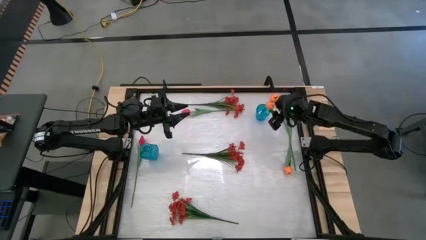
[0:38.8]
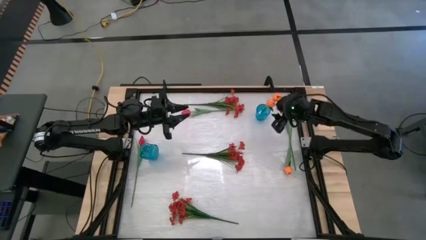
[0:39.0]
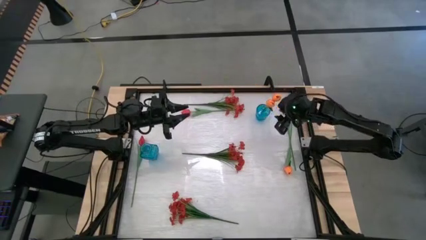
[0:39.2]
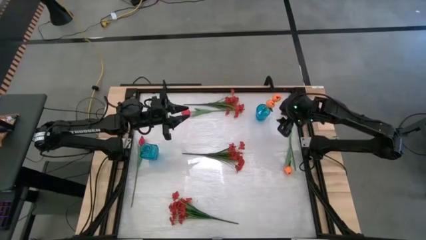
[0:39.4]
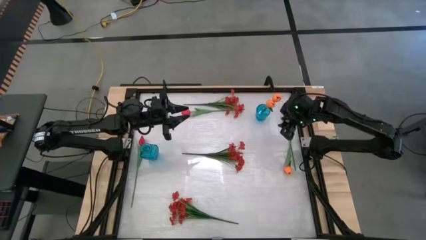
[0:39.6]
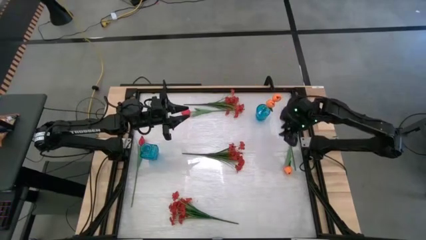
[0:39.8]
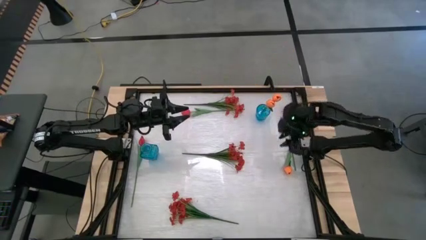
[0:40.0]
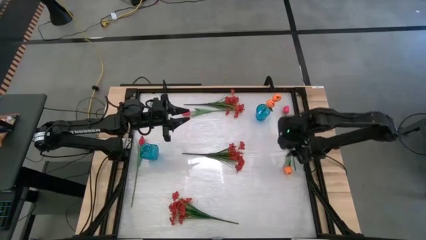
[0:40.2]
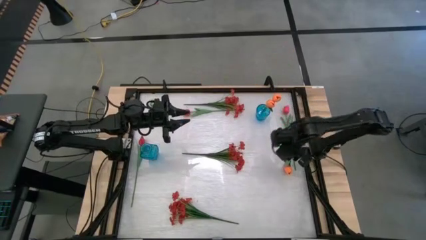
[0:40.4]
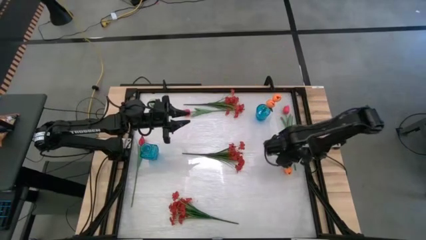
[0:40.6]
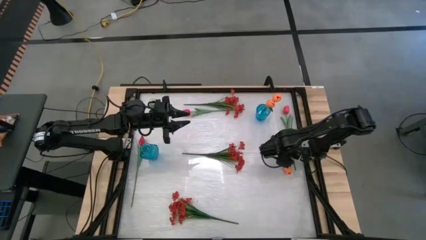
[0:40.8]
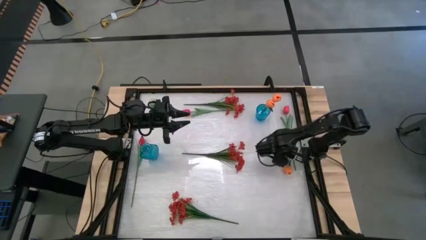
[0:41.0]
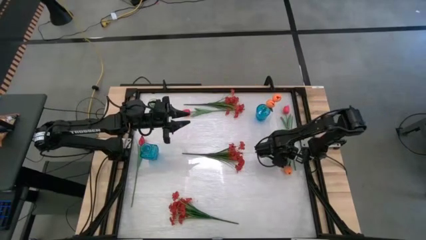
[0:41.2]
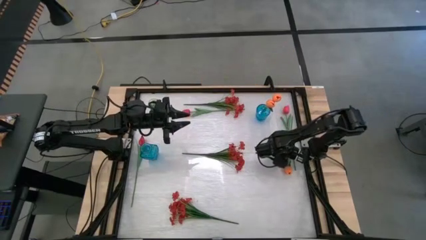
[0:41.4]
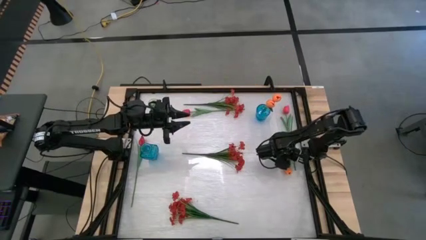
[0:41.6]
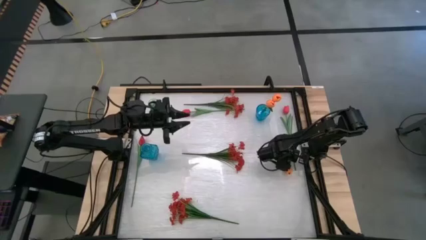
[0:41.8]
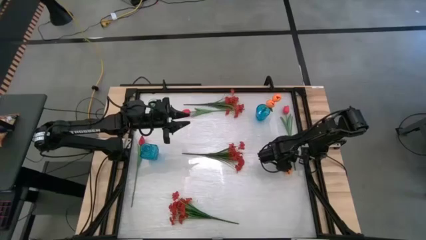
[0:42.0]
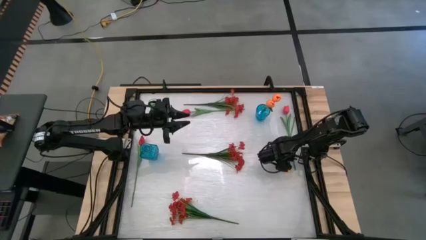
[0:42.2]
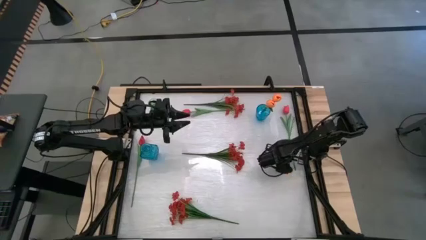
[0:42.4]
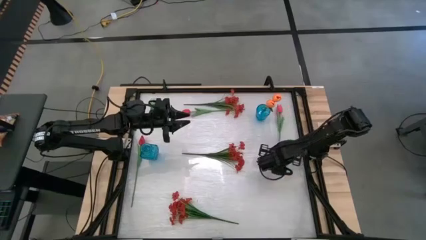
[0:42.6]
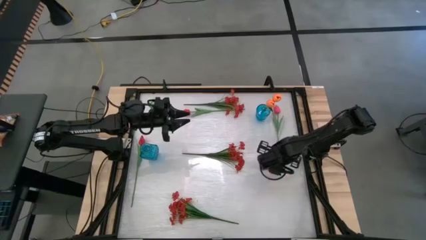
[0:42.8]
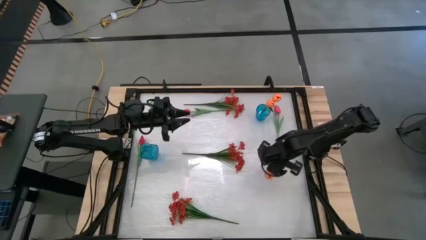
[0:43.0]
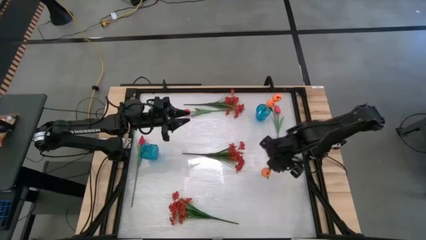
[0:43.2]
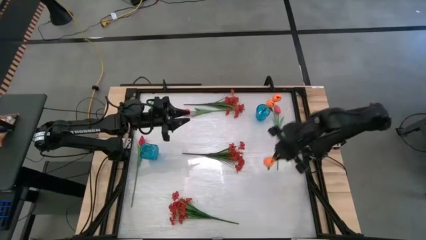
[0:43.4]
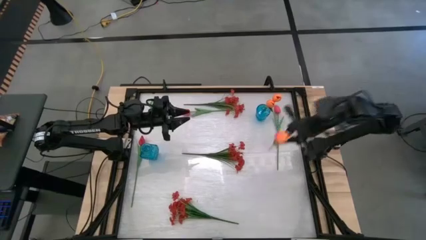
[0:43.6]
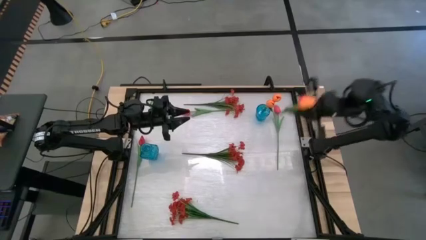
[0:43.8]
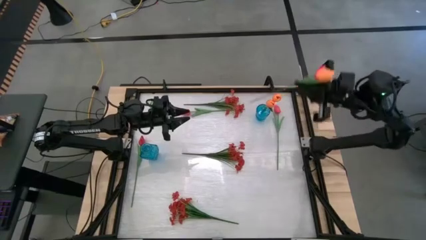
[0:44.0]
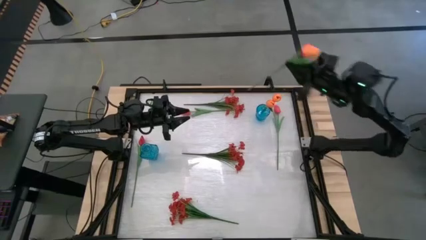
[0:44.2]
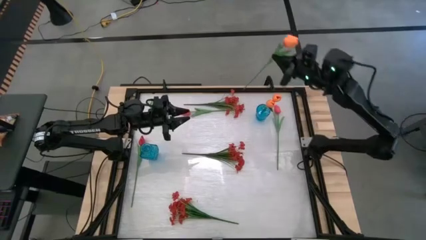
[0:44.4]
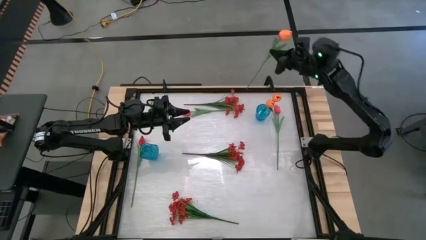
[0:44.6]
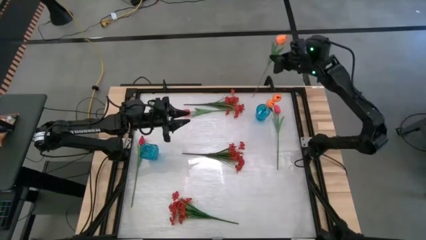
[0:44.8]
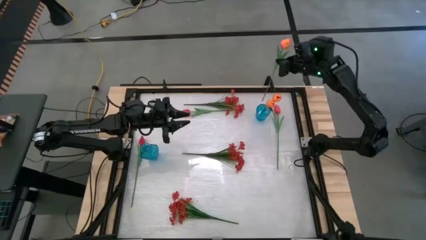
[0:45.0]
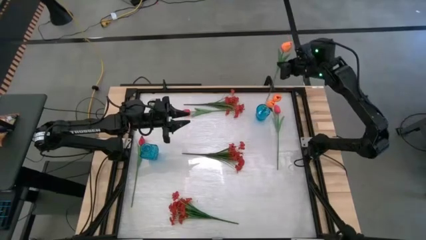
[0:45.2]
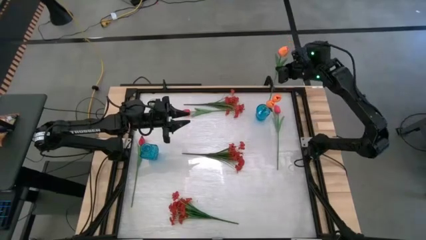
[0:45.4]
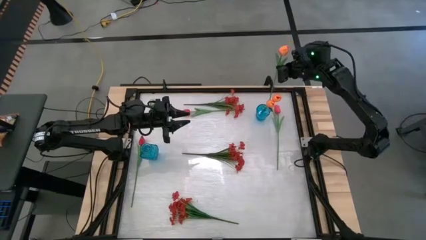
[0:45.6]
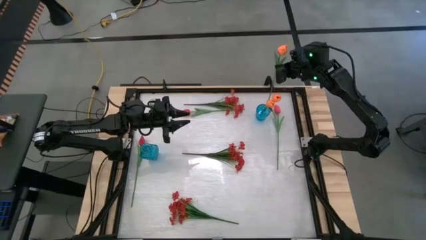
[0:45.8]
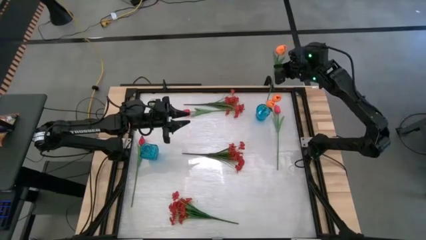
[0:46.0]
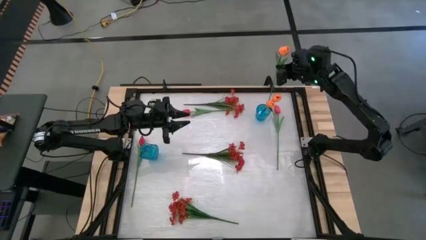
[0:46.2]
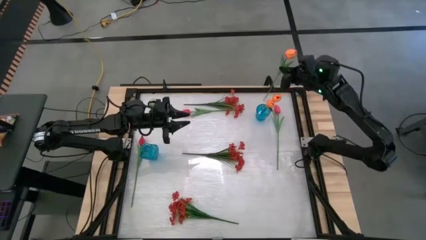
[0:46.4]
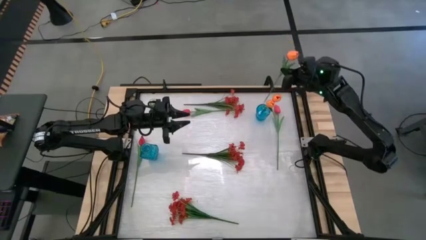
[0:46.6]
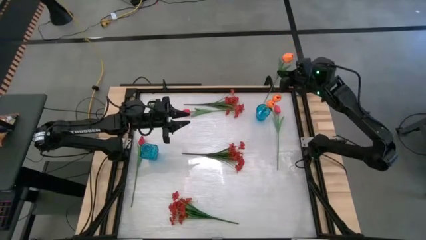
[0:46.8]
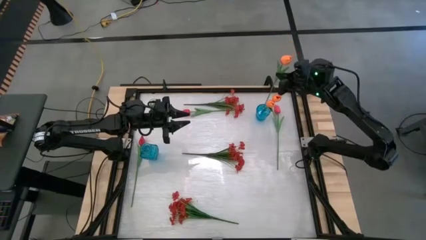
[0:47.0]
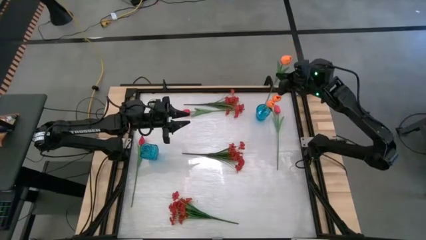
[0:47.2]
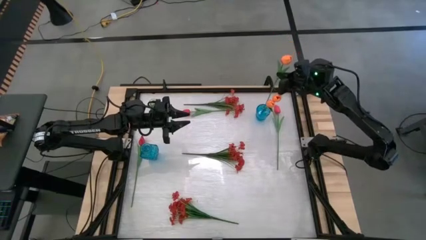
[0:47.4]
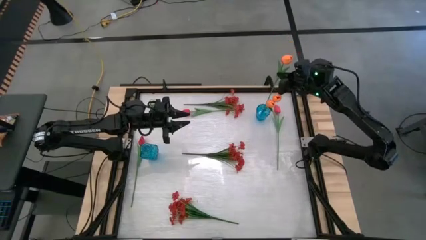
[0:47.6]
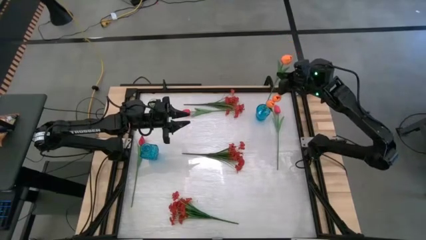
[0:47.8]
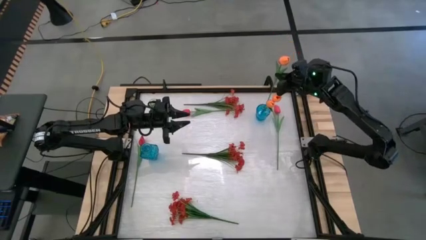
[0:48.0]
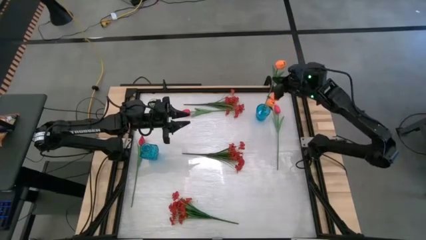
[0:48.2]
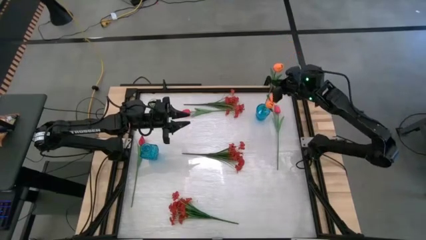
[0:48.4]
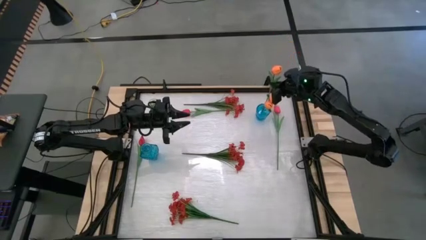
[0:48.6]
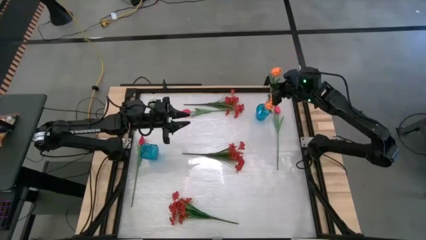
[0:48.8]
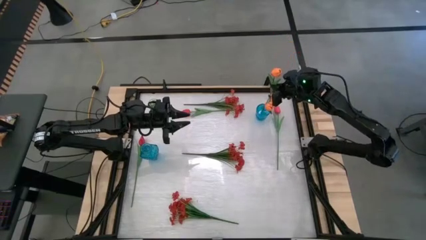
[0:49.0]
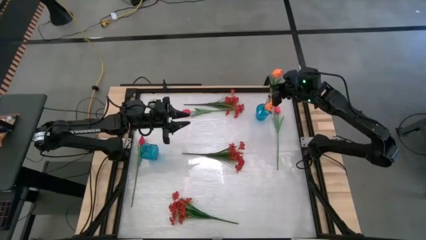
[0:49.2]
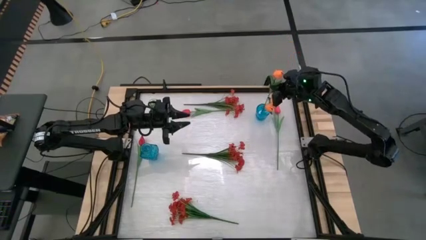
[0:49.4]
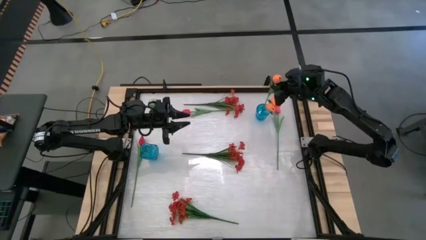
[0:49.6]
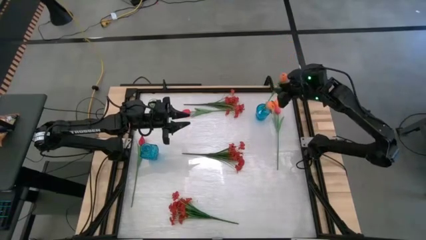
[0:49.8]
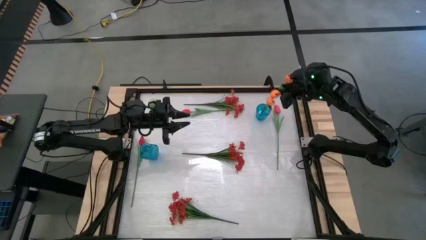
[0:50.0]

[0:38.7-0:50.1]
Task: Sort flowers into vase by color
Put the orange tulip into the right blue vase
